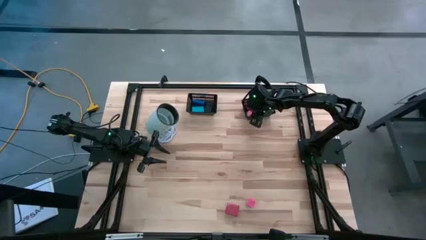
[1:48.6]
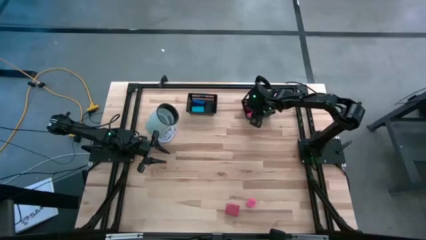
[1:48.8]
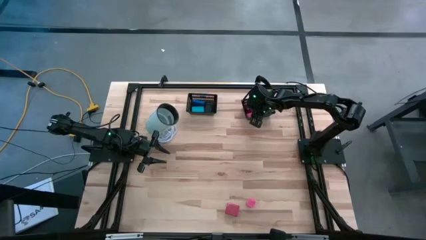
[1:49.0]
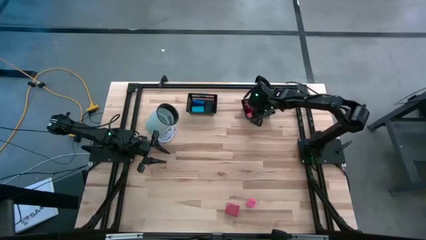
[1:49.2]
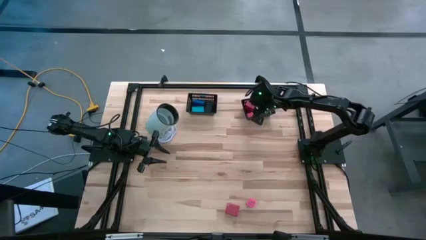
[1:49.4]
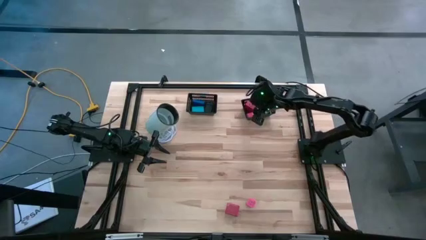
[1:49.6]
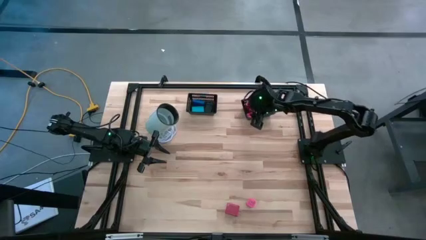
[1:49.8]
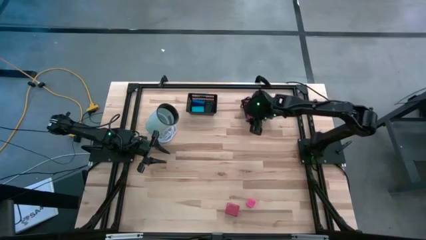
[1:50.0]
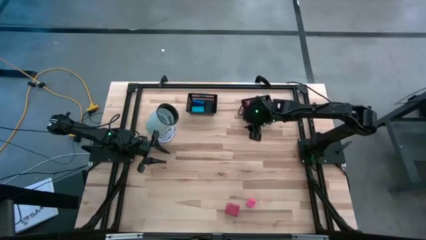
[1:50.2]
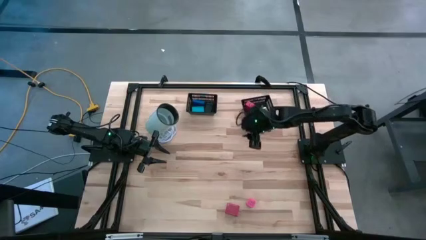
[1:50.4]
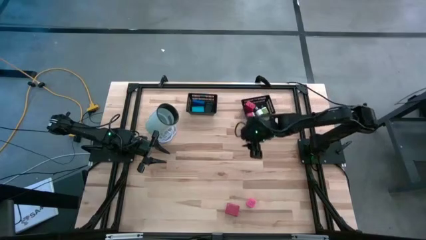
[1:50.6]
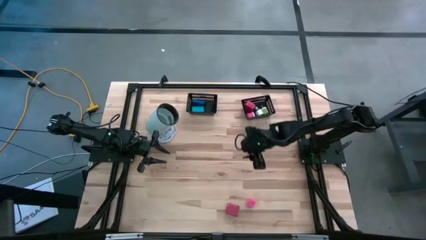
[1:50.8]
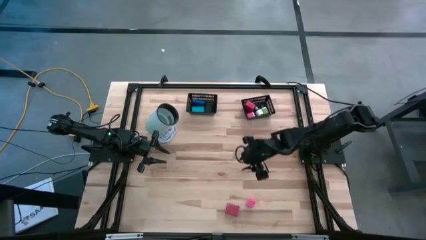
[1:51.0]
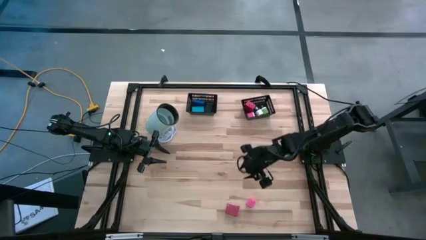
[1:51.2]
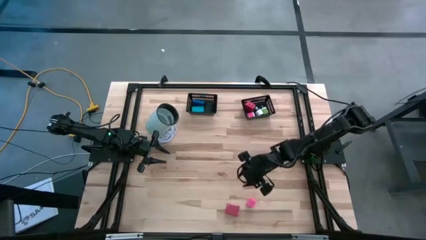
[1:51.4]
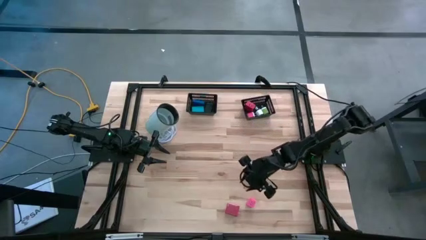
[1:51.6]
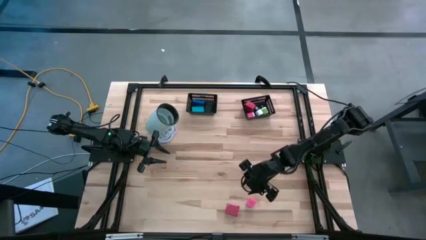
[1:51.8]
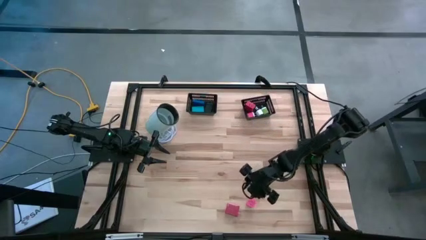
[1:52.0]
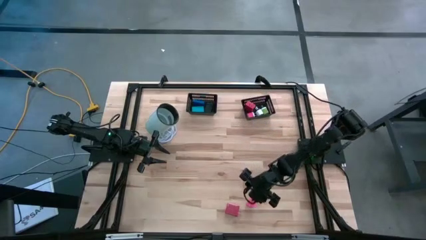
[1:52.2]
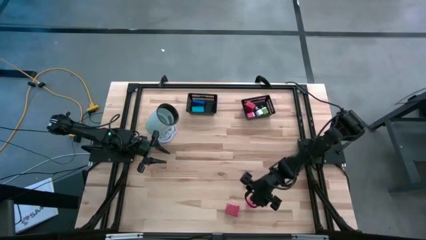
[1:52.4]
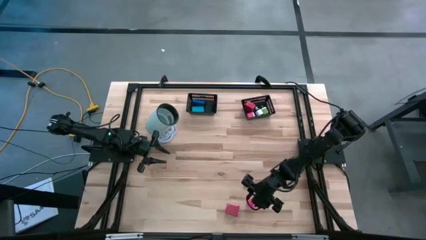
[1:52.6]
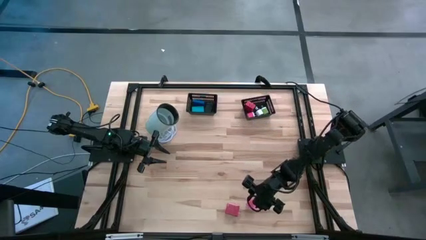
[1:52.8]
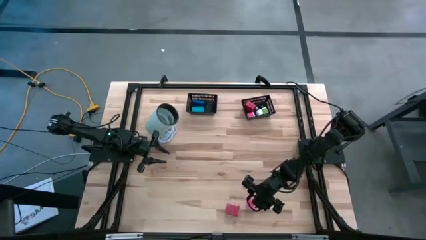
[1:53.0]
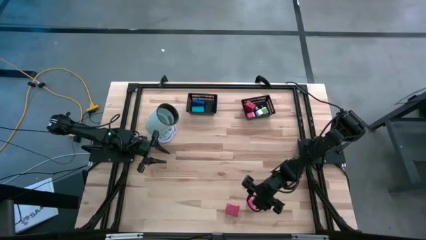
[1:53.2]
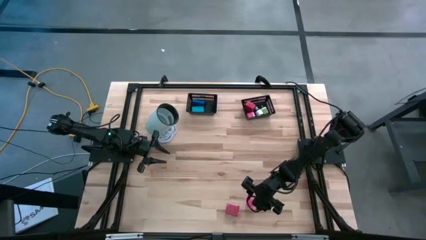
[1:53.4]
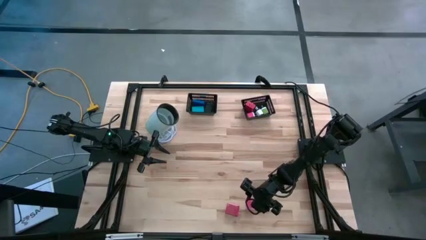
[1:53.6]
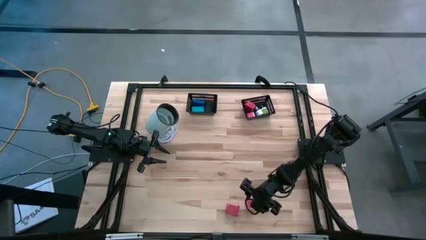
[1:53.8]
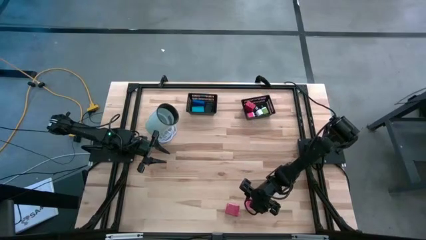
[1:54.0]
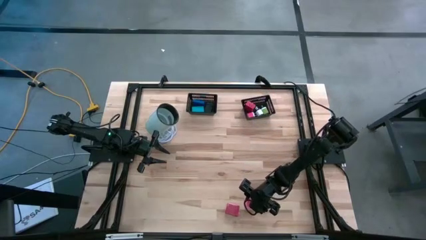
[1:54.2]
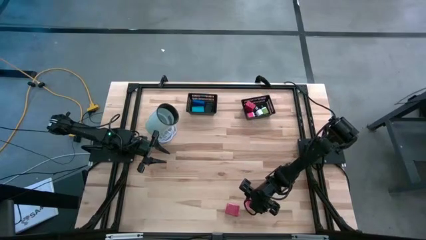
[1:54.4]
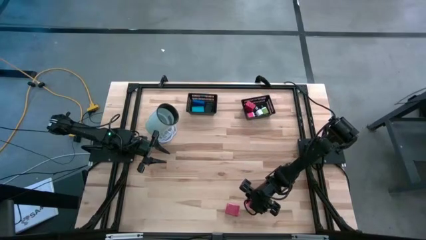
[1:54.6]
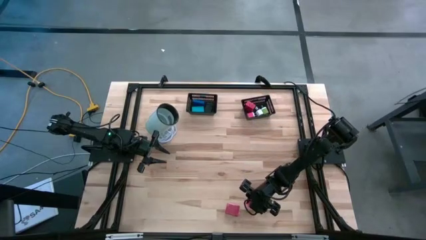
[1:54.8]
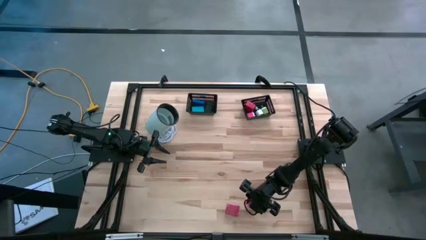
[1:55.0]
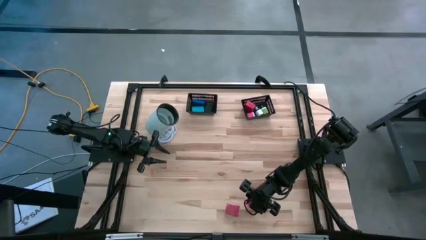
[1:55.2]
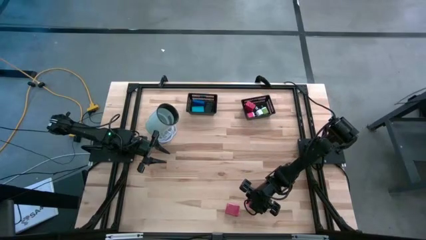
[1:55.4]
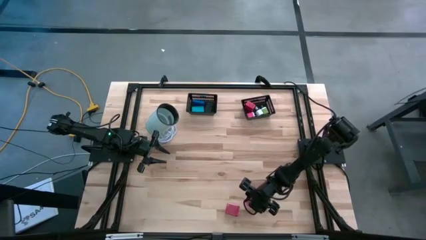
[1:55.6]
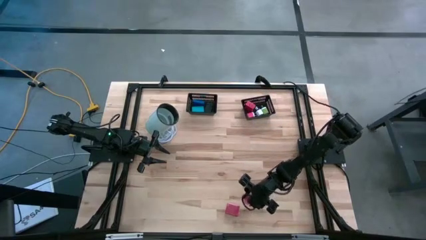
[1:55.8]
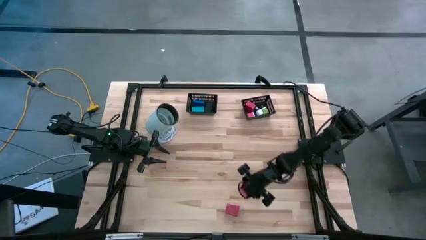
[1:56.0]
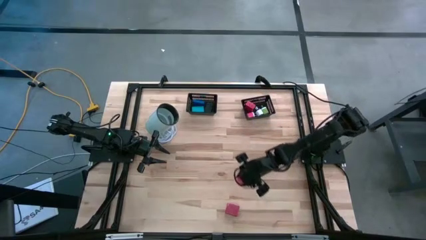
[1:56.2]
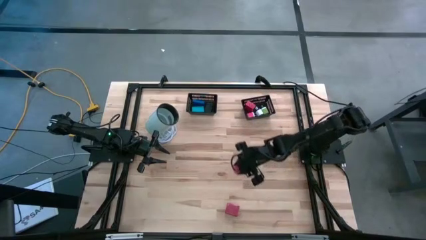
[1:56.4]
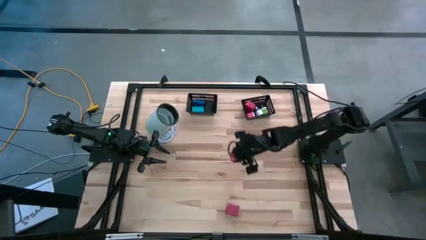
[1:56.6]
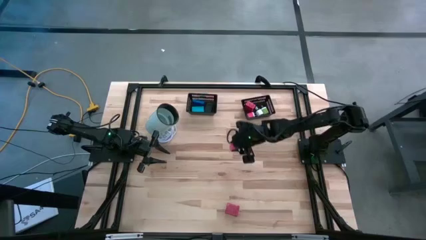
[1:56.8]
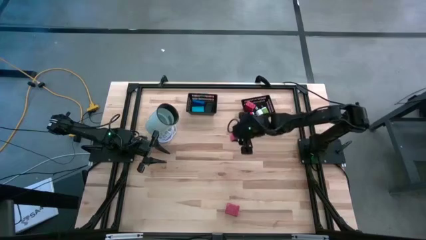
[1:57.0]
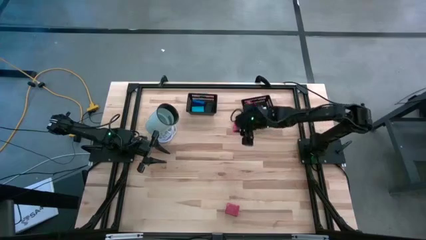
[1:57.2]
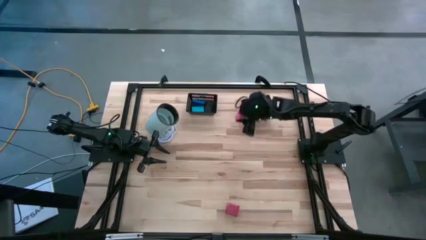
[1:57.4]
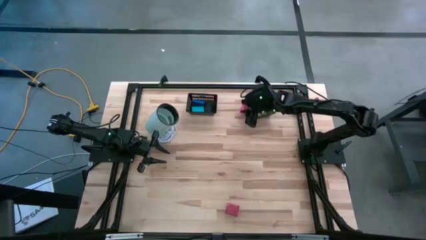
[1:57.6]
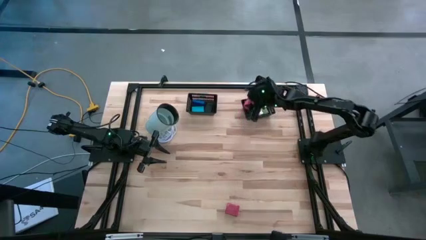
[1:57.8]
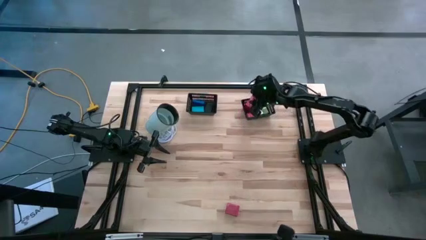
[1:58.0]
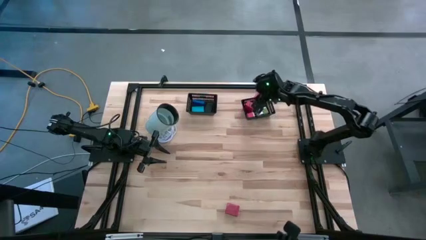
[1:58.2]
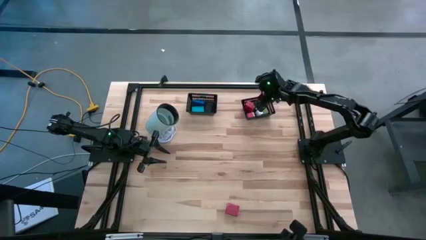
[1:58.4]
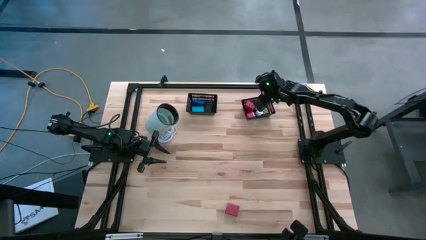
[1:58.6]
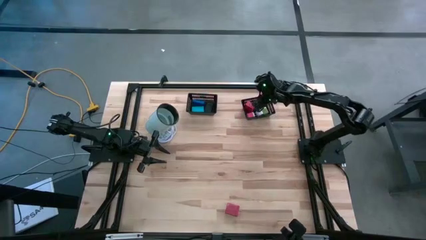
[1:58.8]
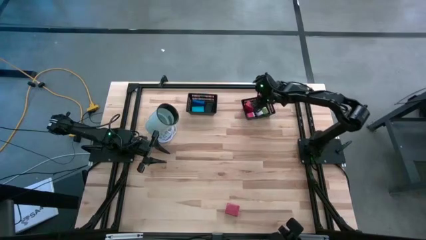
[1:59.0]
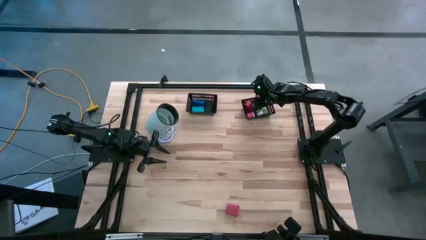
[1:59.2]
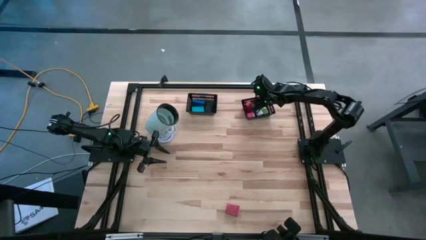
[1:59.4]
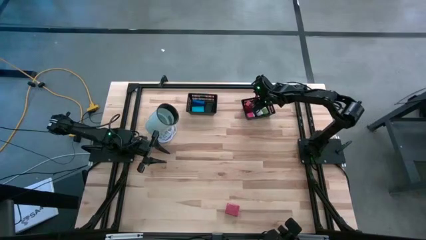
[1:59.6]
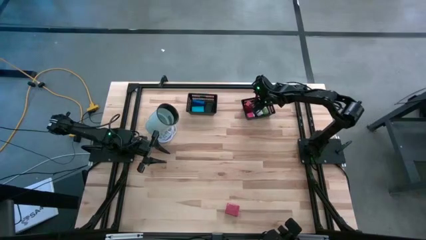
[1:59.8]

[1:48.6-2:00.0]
Task: Pick & Place Office items
Put the pink charger adapter into the right black bin
